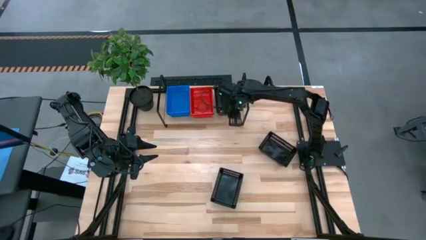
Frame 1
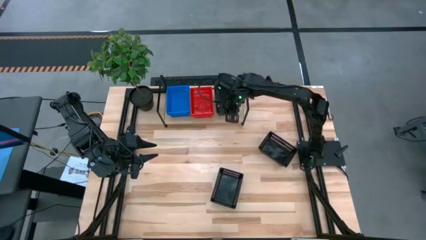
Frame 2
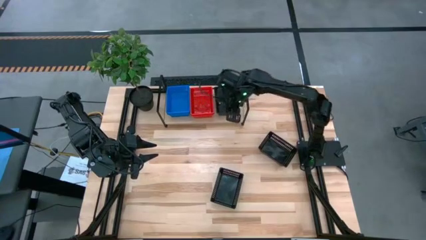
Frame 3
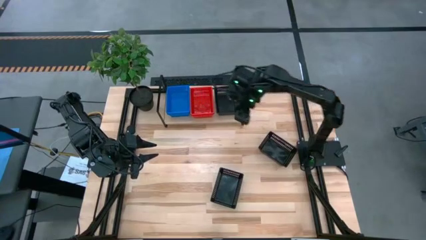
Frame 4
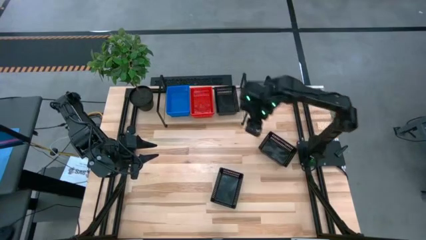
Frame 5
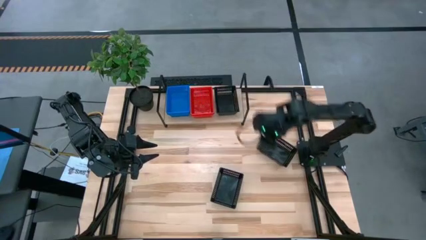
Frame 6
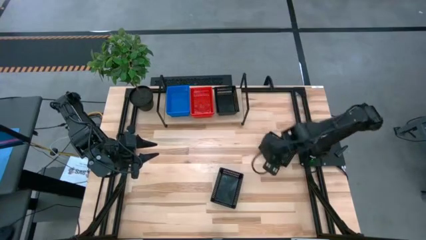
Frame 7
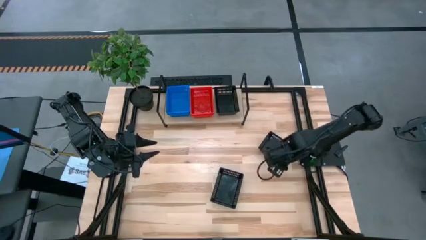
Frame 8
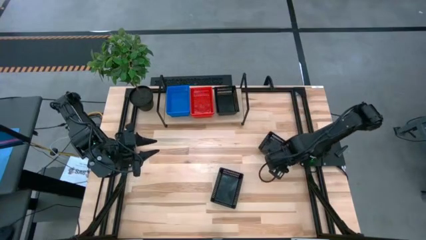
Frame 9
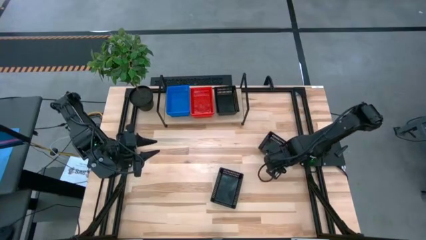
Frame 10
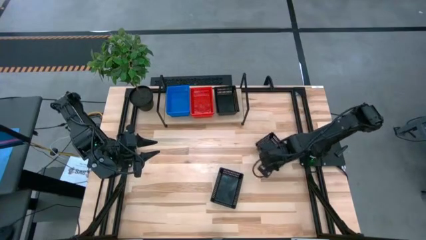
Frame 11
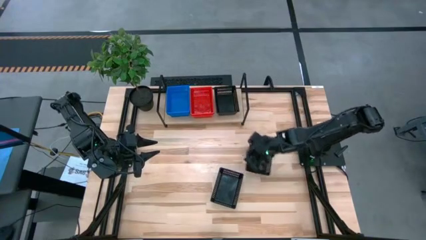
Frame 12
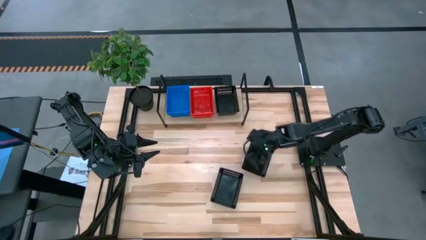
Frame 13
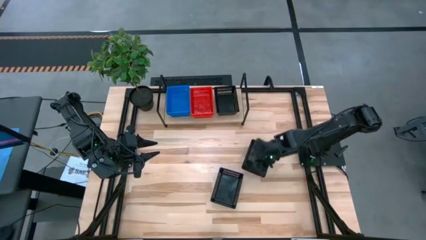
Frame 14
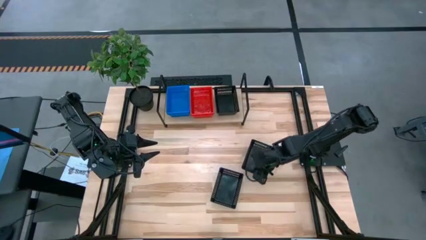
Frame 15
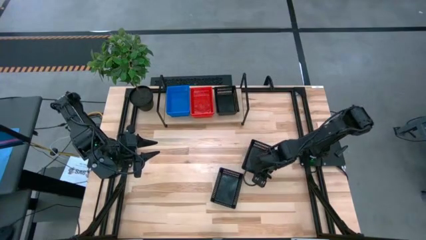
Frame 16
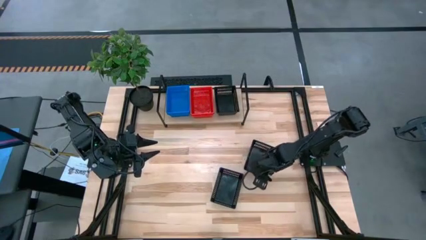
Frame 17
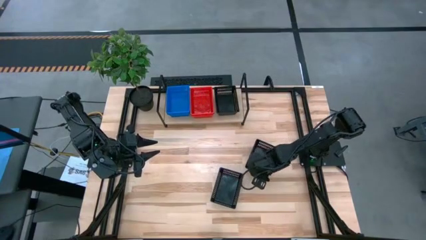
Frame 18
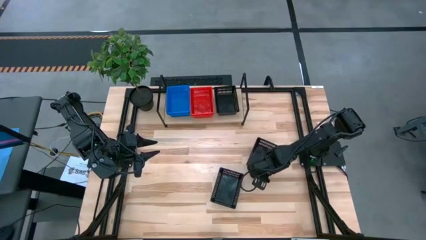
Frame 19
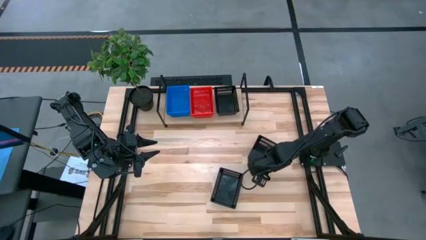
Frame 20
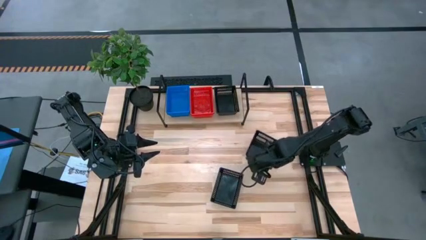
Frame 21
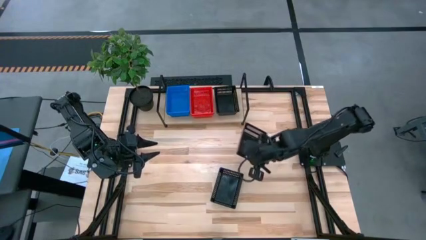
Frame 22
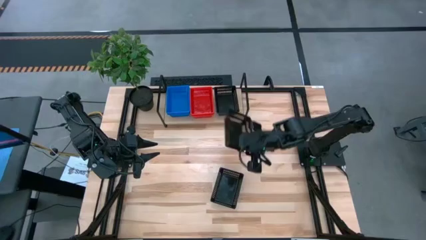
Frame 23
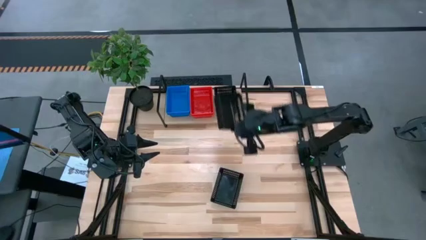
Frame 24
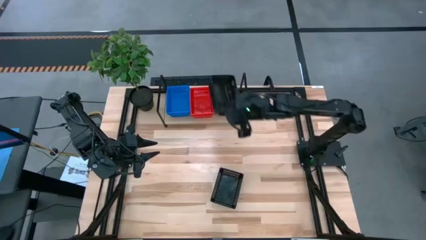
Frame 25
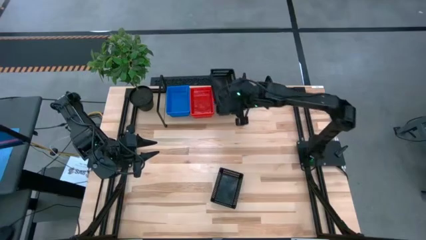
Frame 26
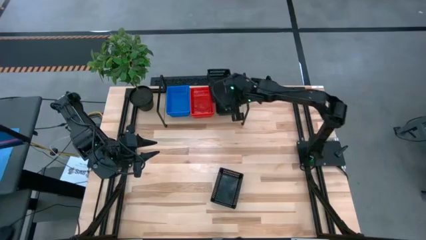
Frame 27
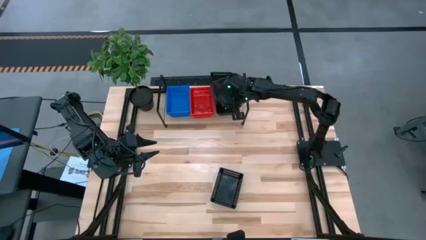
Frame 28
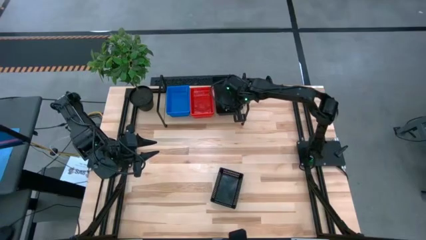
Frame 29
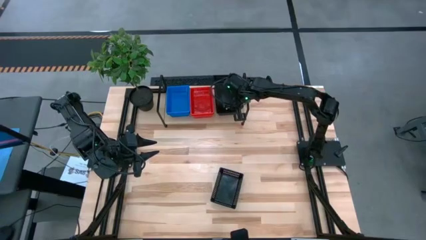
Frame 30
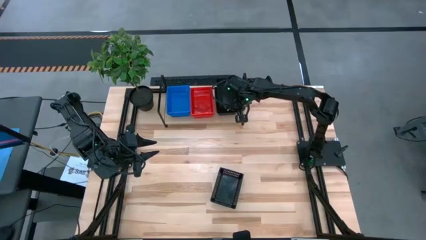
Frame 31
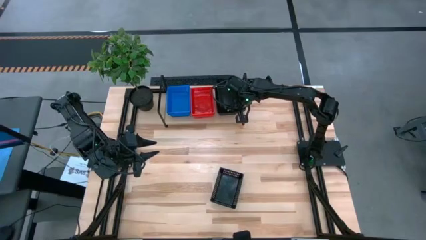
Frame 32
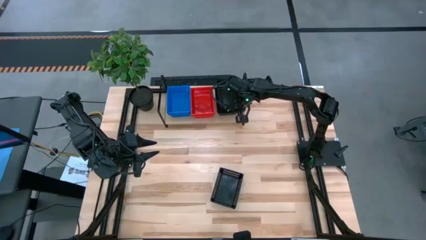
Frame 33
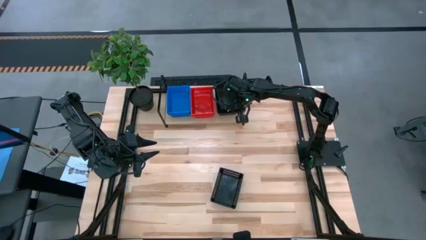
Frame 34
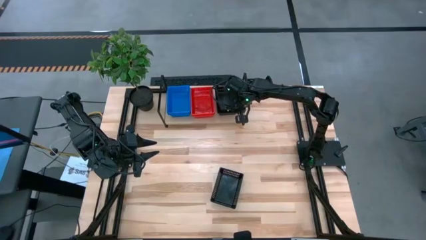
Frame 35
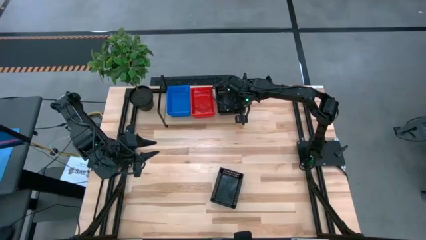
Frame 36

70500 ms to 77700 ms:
Task: Stack baskets on shelf by color
Stack the top black bin on the black bin on the shelf

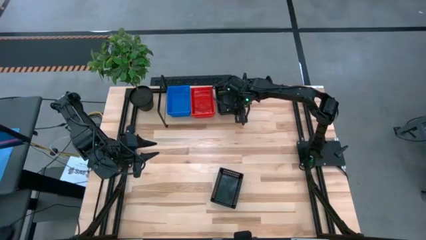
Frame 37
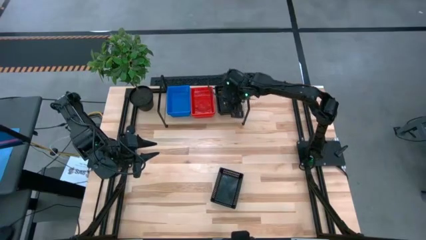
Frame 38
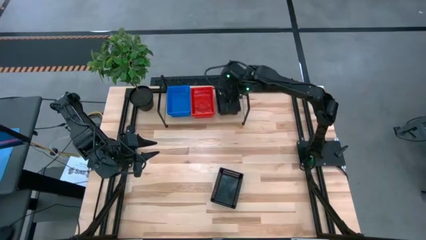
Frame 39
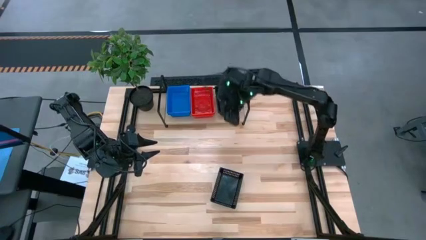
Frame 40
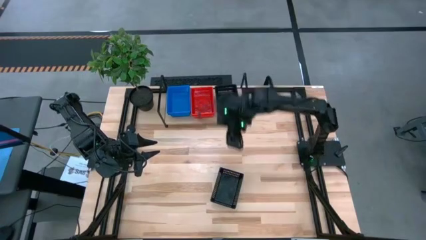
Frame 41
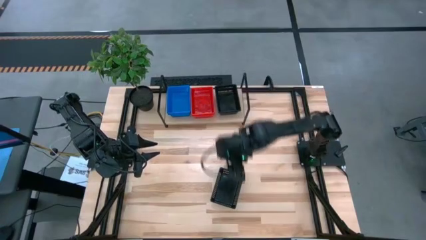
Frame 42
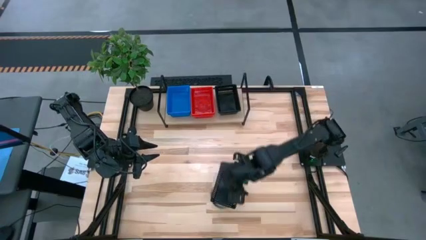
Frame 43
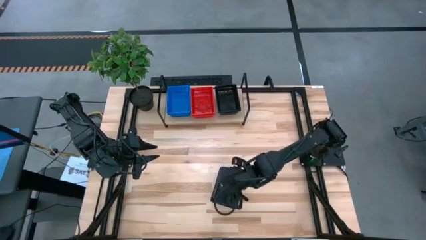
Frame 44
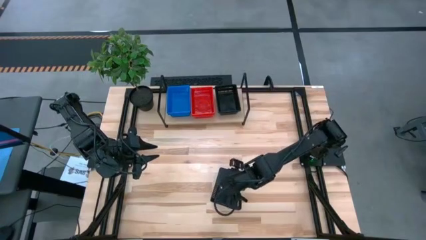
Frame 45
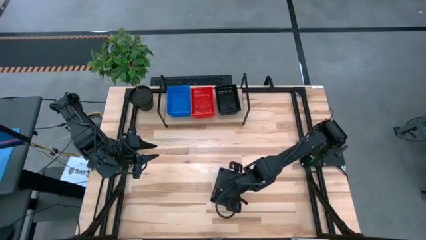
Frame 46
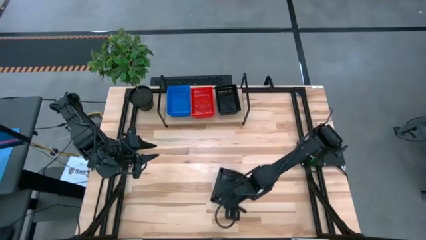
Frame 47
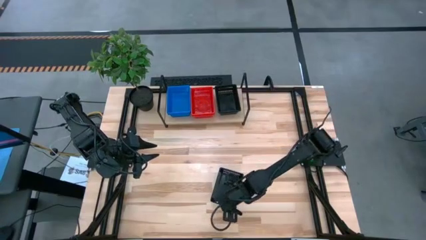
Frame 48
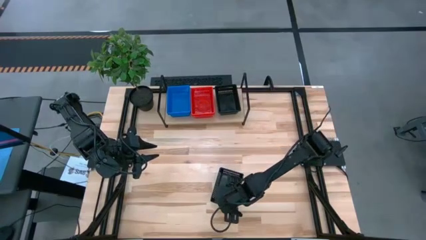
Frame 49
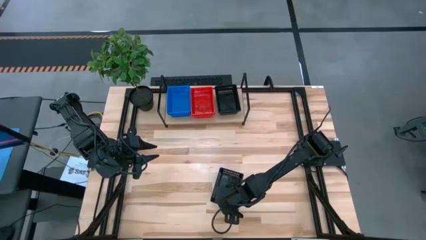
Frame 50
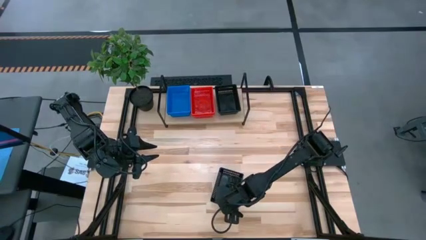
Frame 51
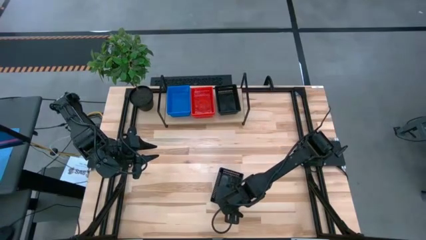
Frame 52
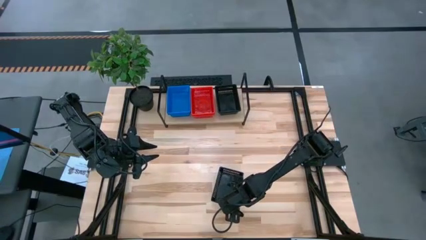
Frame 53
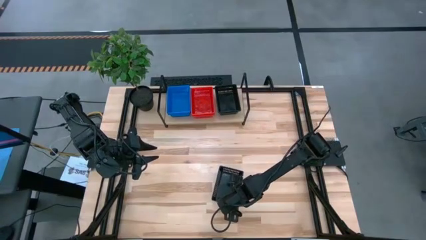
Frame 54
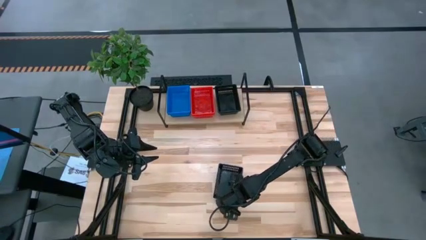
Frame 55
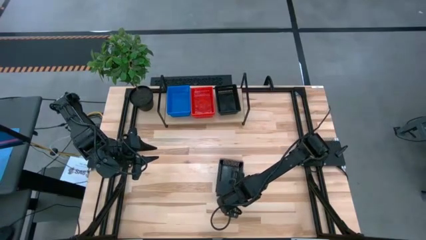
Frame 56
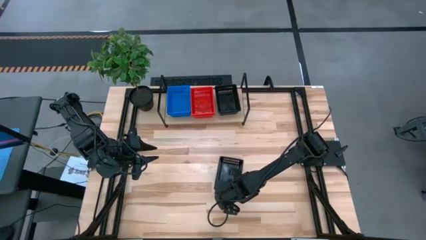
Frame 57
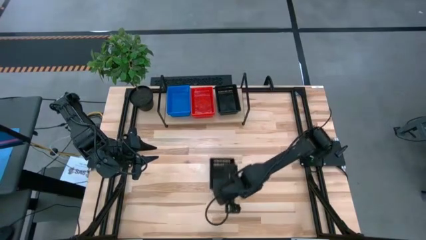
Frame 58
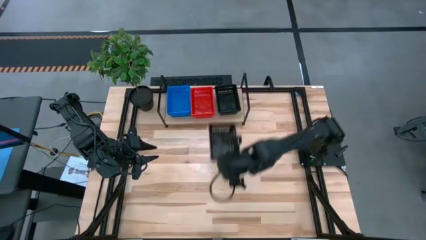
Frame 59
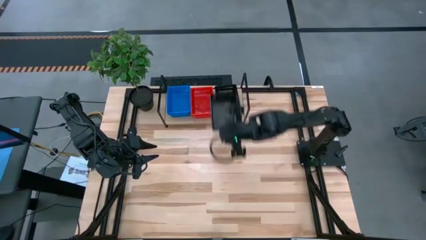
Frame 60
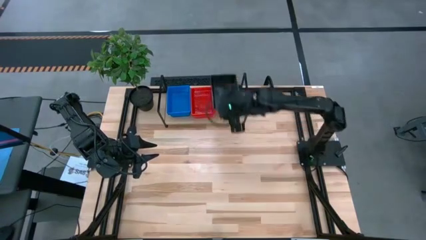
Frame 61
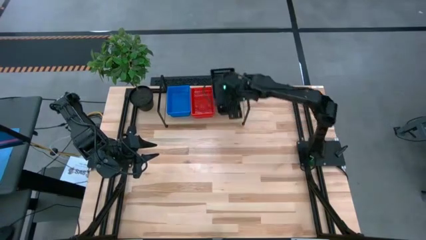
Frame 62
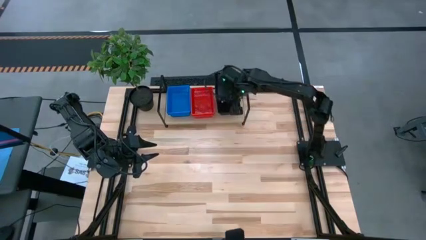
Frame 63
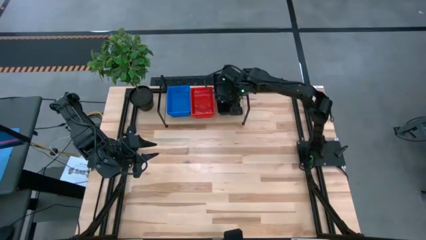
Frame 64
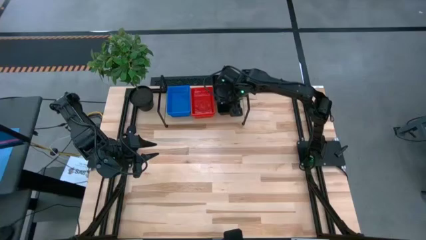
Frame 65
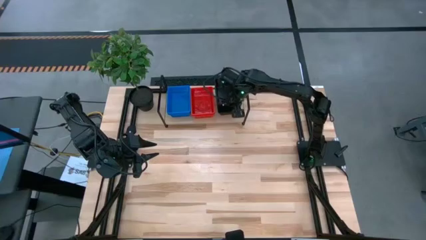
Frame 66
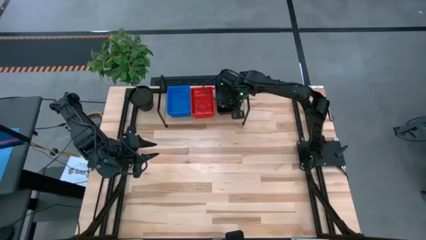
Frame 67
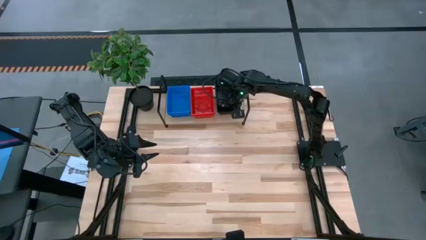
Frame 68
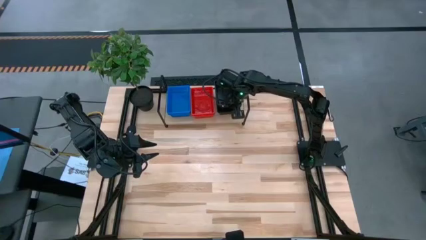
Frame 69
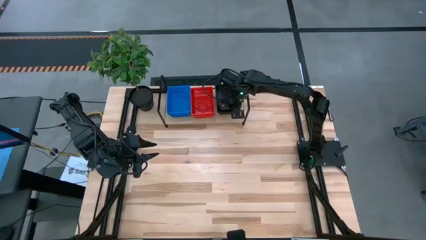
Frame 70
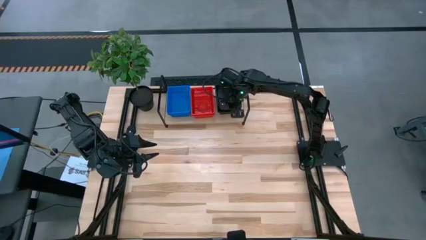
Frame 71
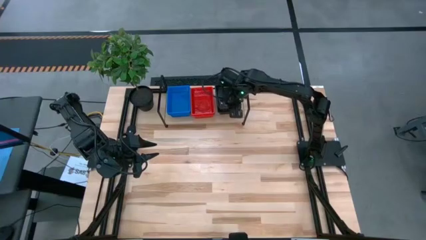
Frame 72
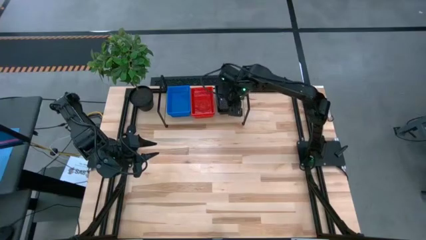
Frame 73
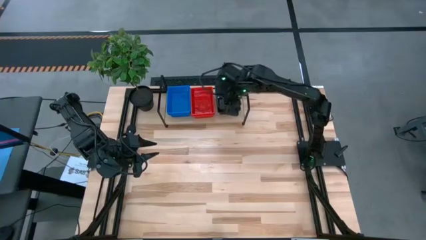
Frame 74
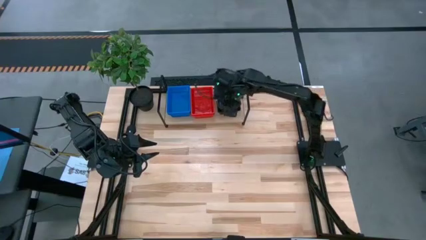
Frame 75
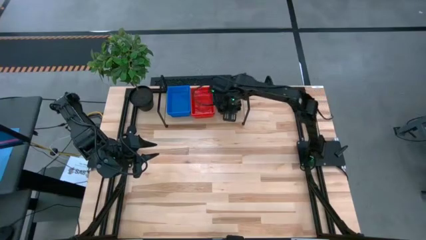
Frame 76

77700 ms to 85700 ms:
Stack the black bin on the black bin on the shelf

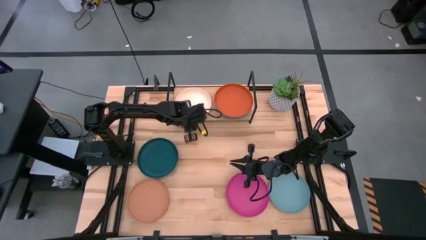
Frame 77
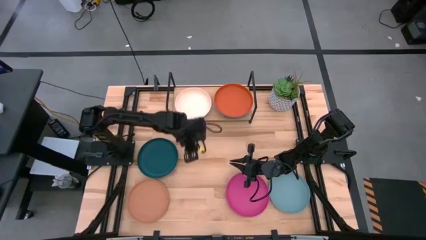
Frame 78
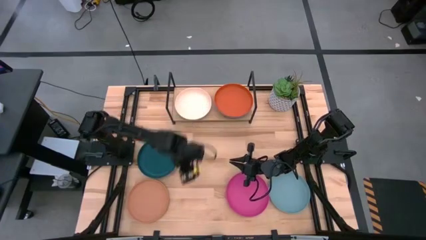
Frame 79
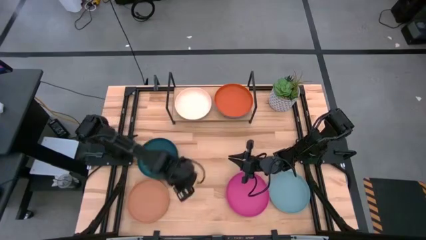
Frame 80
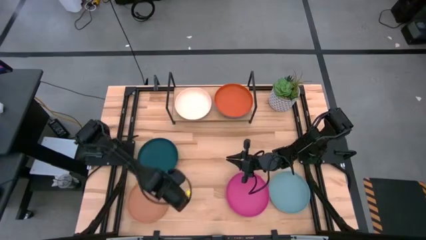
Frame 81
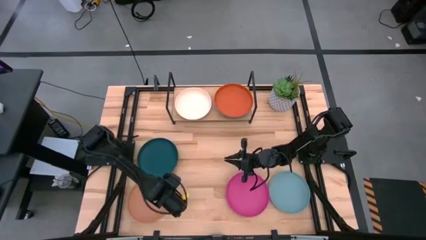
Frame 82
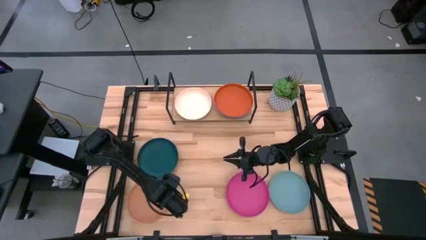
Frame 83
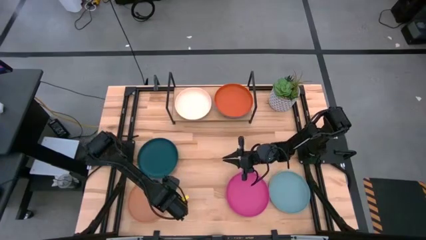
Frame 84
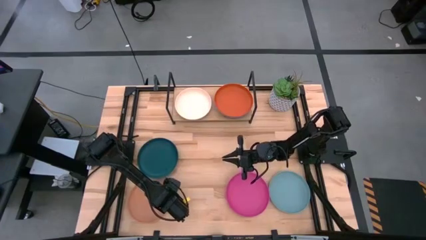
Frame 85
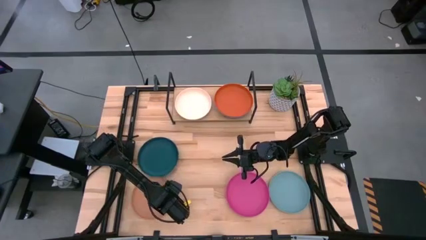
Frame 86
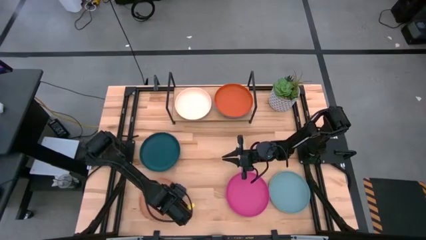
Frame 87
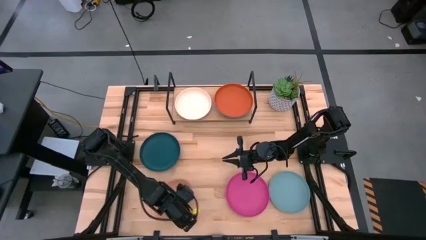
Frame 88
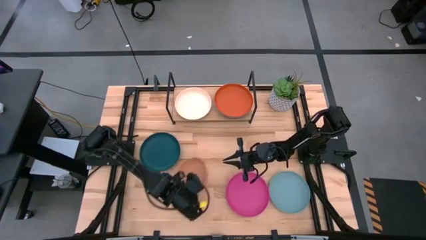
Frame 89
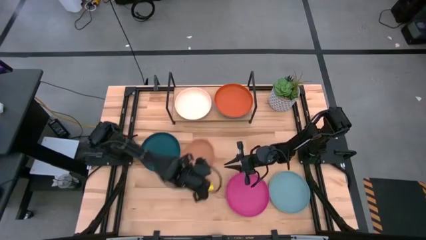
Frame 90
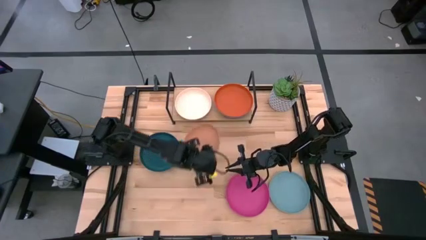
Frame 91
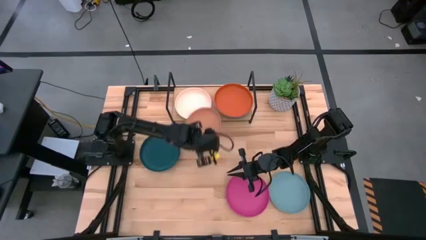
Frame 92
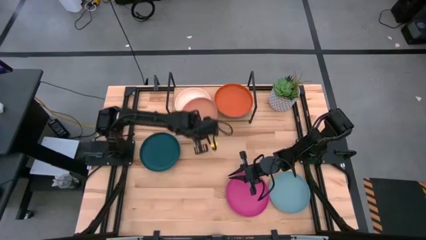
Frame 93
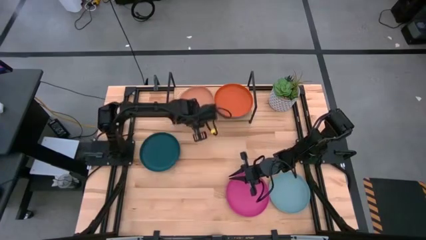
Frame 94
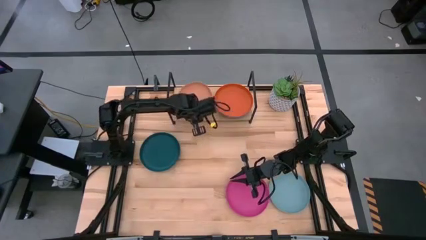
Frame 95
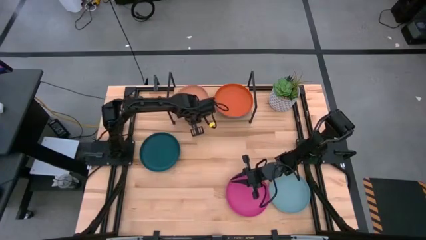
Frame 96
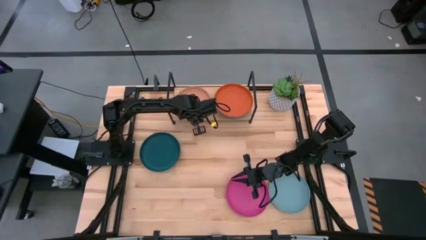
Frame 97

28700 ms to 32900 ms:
Task: Place and stack plates onto a shelf
Stack the brown plate on top of the the light orange plate on the shelf
